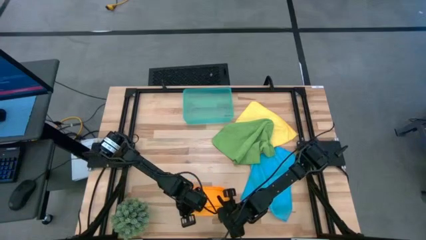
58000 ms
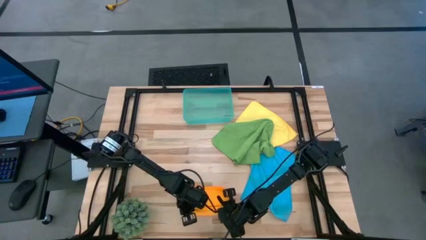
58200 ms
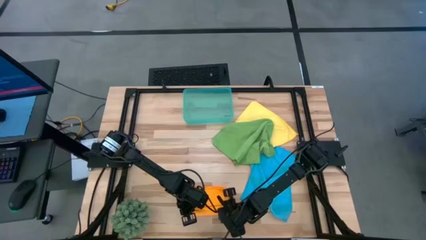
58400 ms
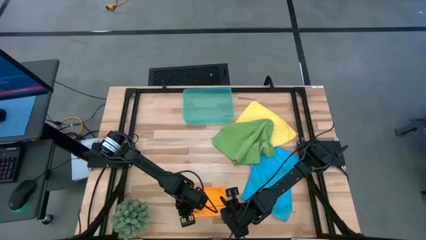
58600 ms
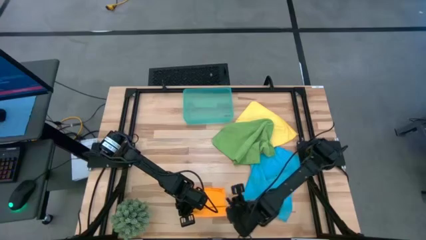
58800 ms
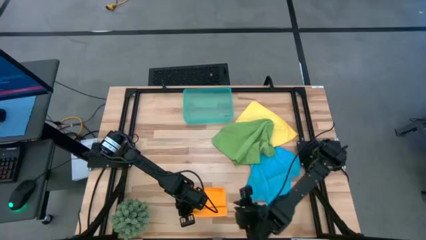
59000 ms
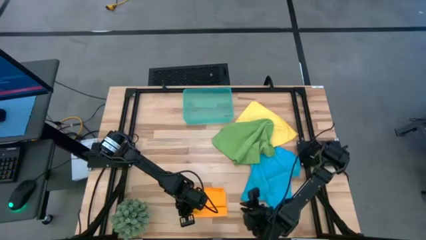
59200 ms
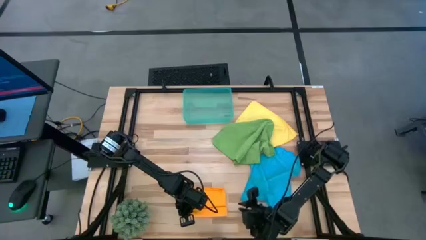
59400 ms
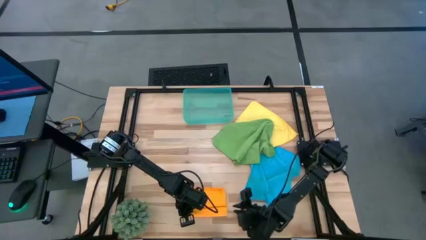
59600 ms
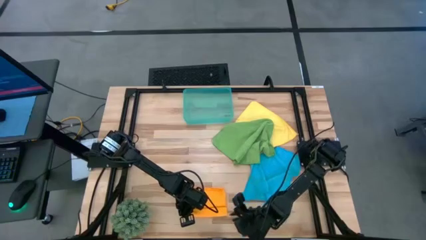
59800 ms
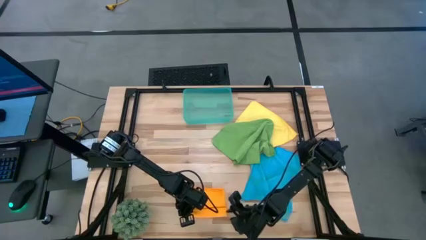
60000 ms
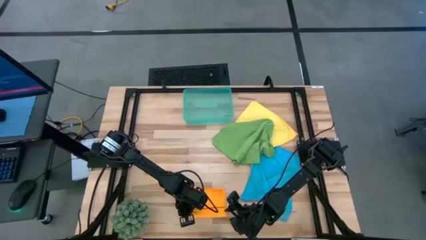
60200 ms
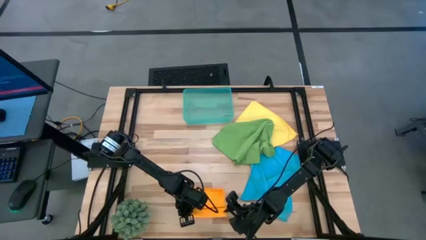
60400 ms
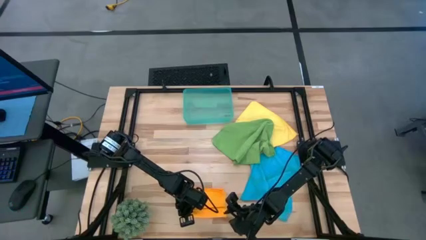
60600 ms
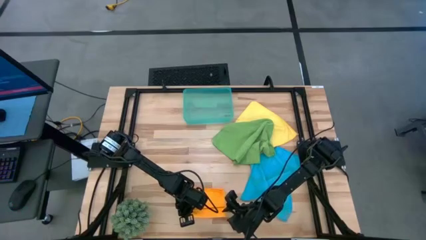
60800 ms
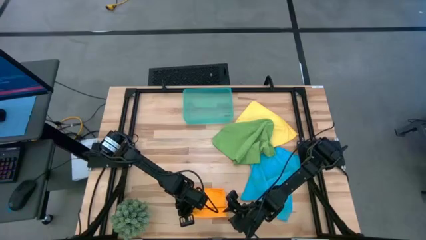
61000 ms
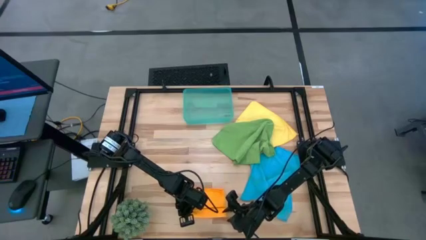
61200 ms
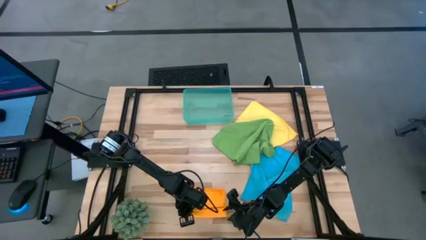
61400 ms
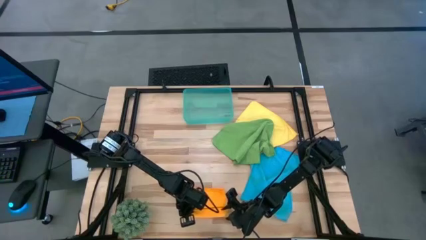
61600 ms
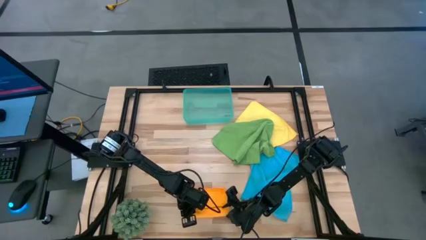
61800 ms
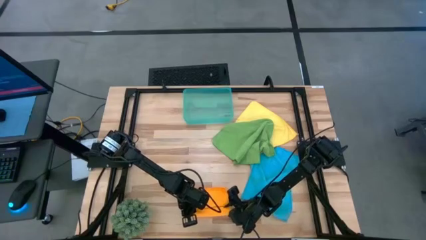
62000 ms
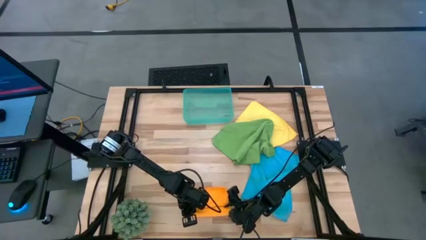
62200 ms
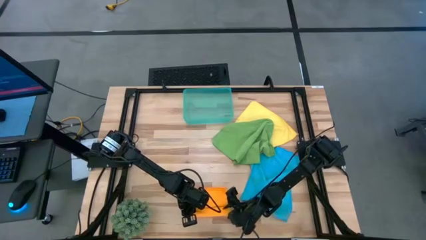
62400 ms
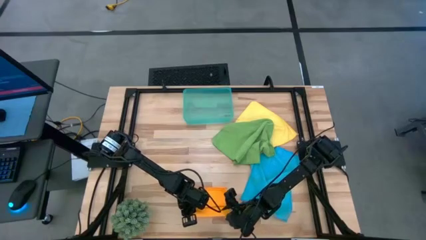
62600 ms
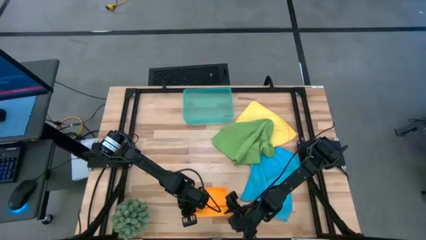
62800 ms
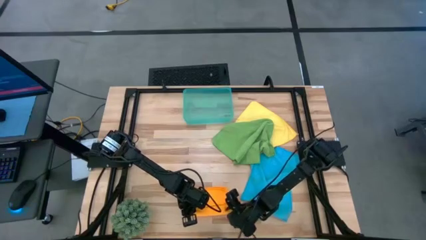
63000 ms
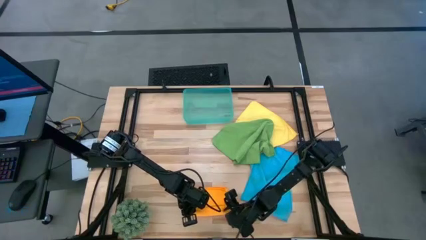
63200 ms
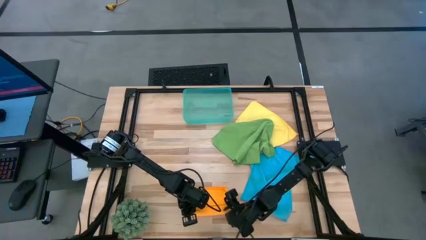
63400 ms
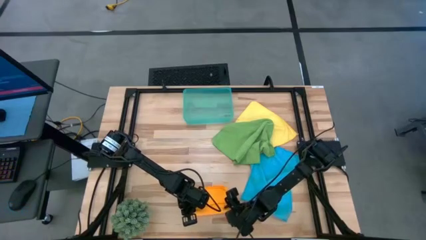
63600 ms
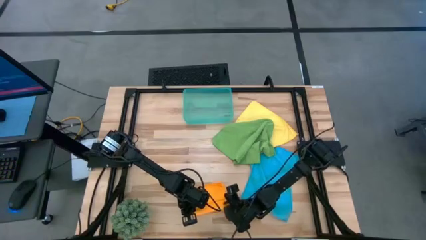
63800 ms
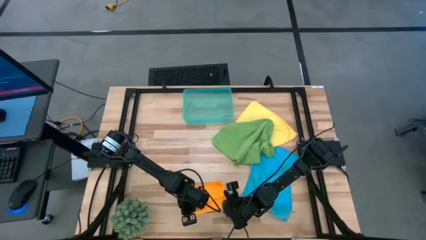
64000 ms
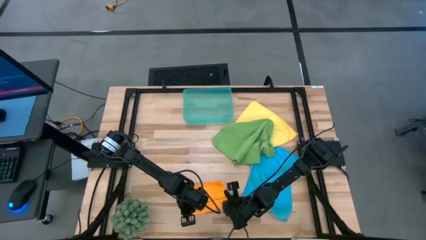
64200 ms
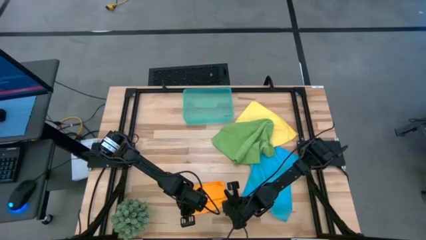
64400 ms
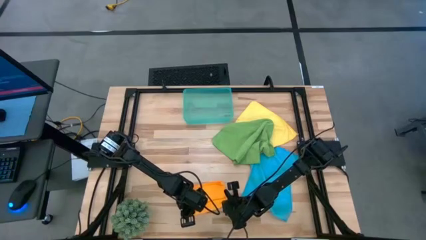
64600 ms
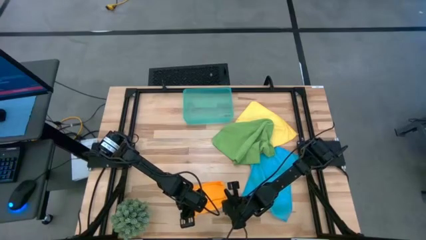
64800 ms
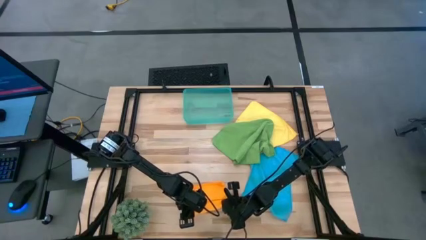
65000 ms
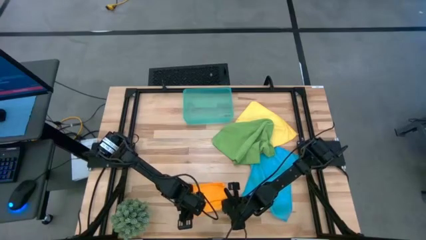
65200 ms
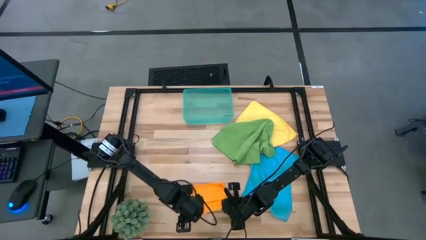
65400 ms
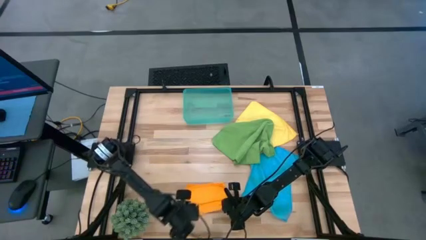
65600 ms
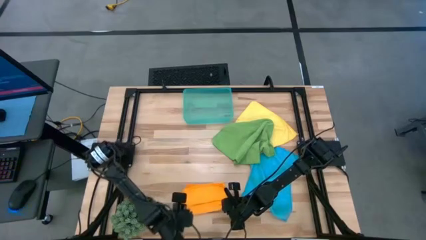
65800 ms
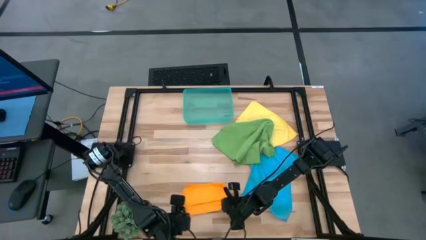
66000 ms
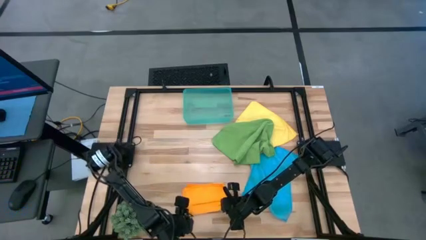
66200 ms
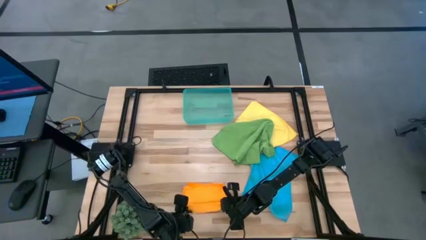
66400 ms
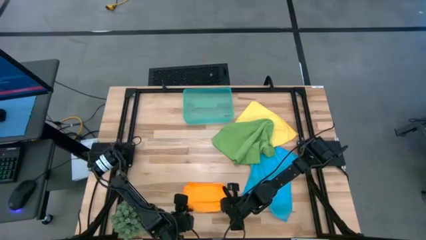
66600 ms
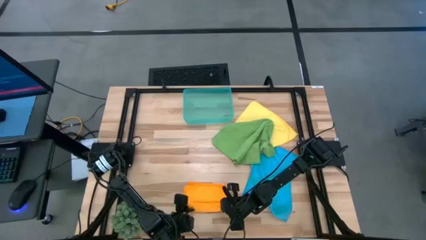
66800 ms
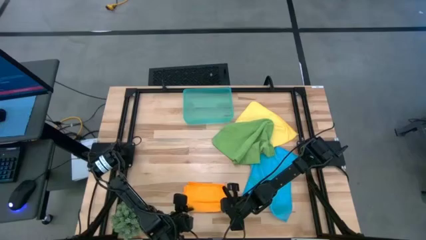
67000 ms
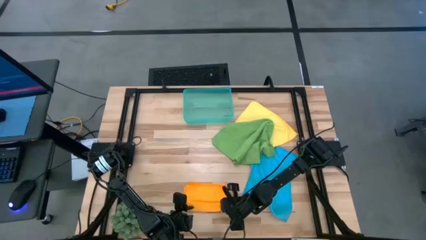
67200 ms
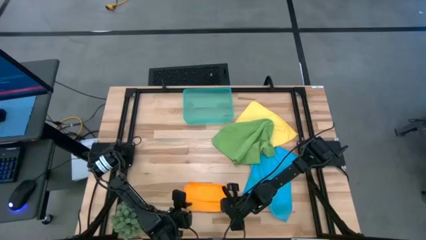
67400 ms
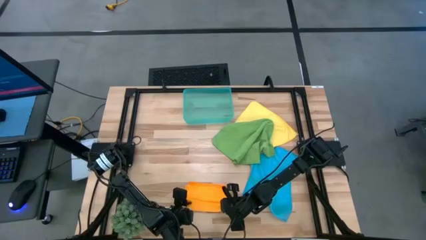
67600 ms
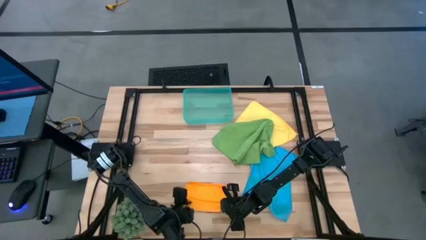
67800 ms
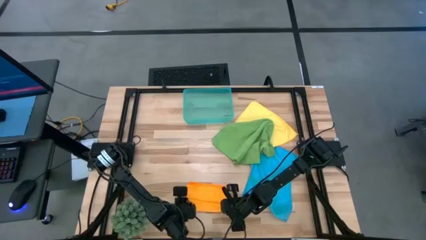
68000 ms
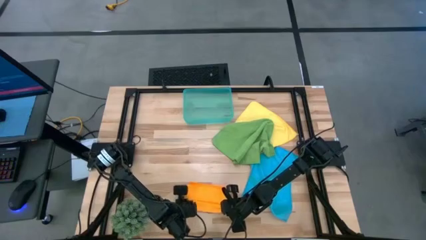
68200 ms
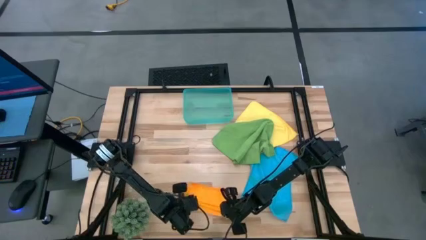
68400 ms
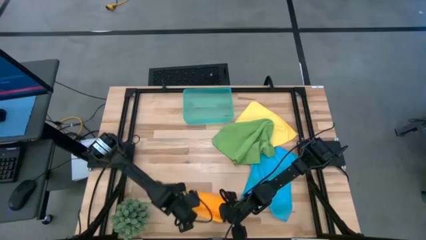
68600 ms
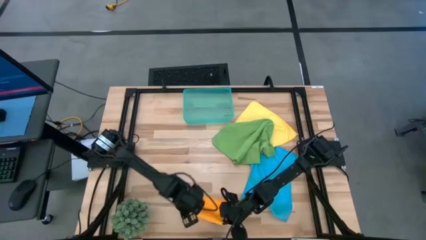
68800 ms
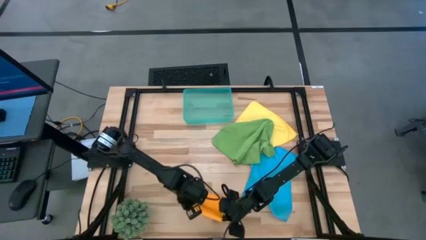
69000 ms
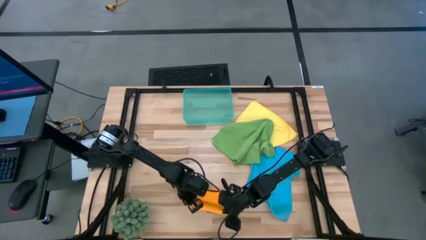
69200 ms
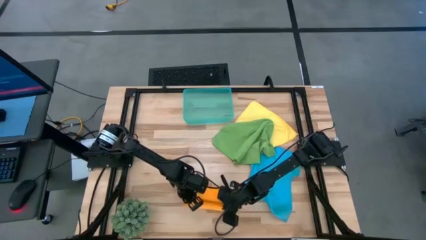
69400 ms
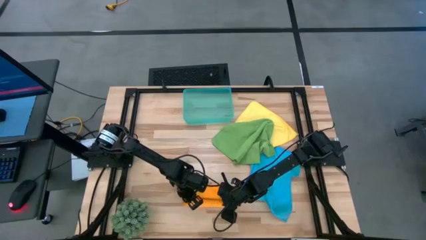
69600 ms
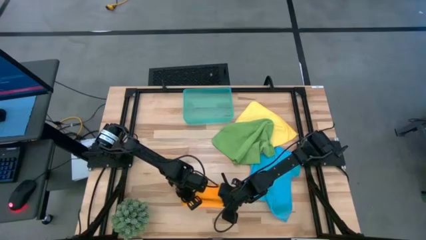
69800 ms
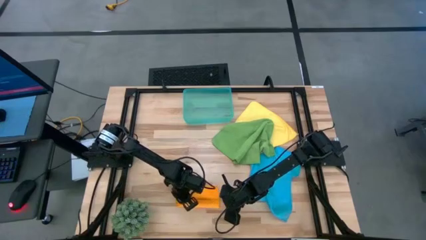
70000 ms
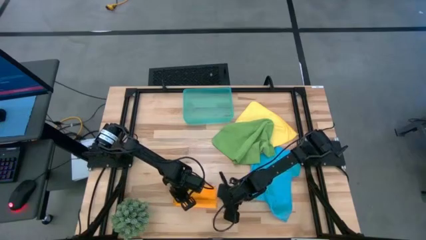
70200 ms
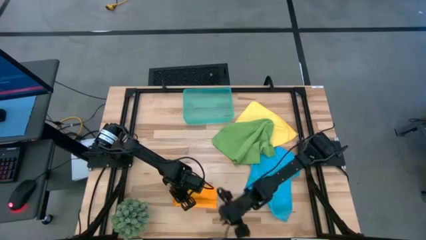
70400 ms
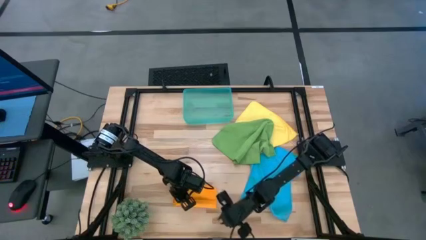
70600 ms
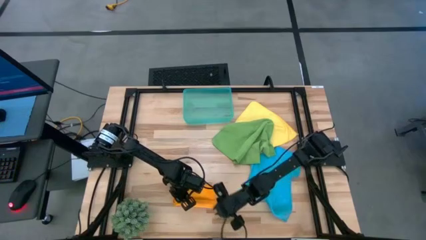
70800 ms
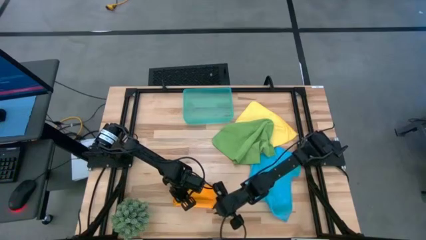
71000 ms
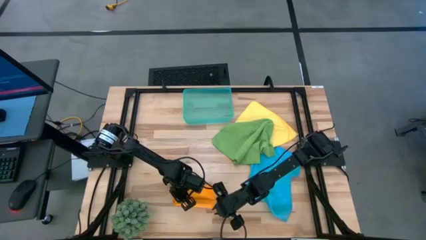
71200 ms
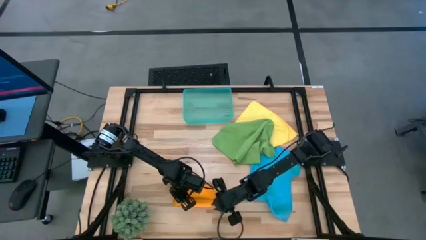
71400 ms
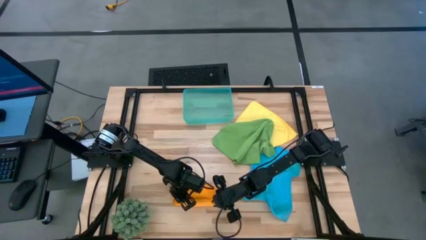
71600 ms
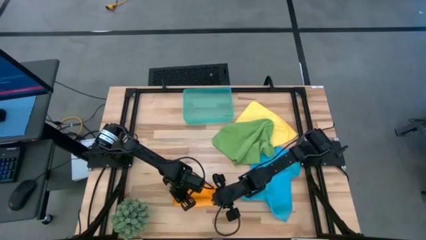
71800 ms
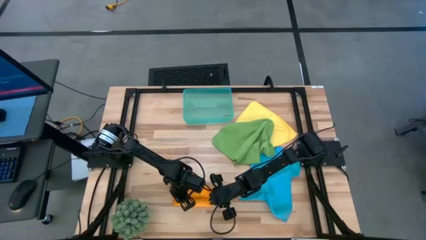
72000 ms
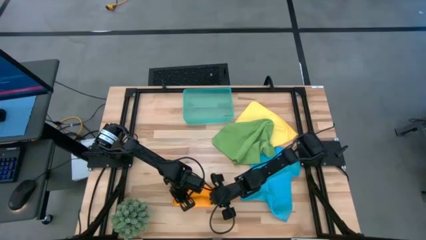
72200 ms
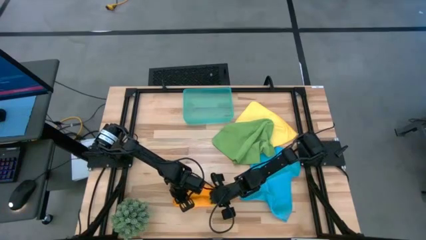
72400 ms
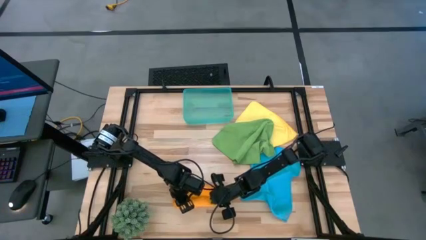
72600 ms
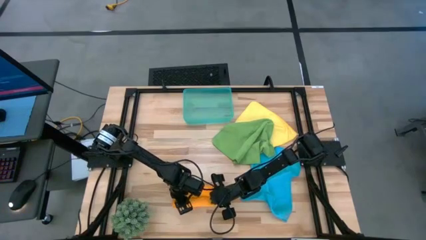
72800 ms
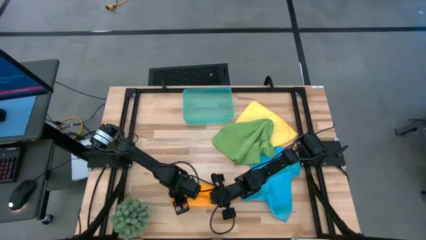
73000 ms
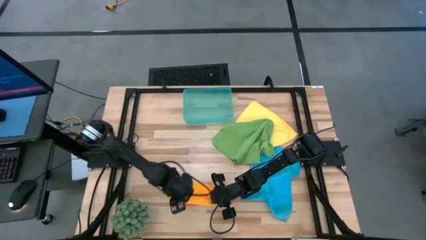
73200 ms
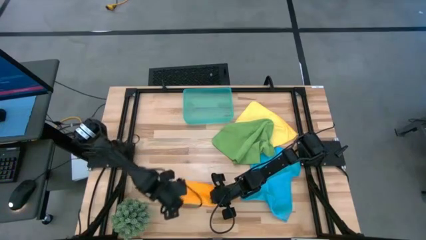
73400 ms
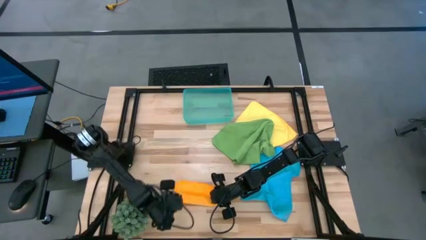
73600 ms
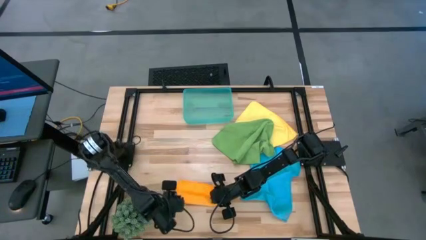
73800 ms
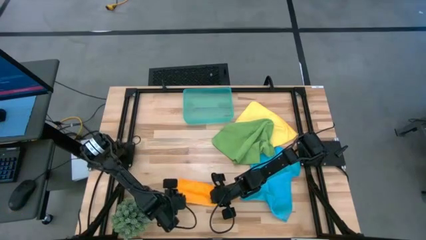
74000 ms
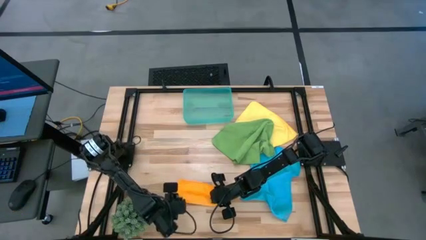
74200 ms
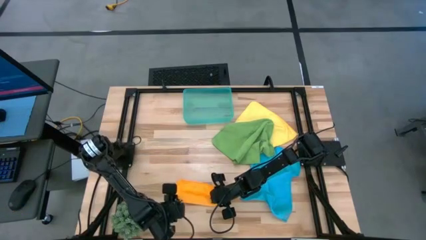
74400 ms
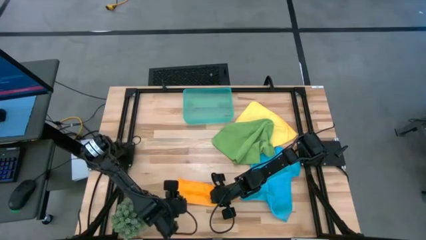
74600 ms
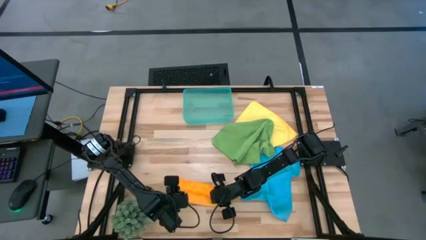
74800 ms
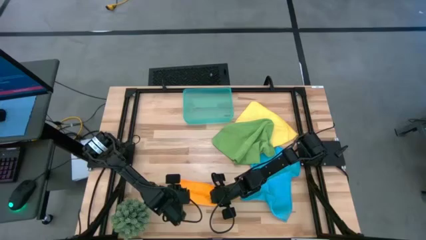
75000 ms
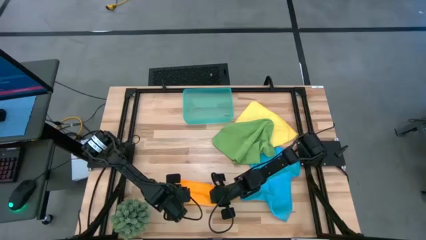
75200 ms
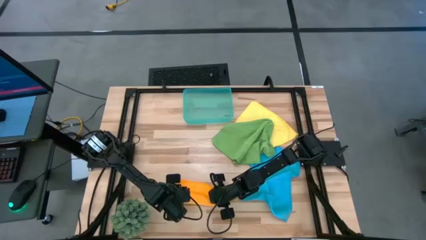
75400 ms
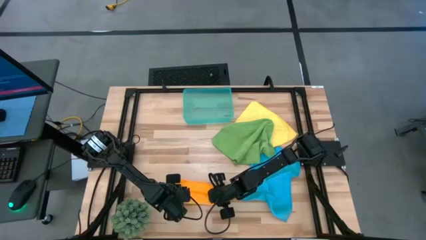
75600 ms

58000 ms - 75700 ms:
Task: Roll microfiber towels into tight, uniform cylinder then place into a basket
Fold the orange towel
